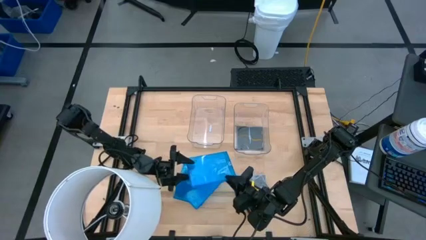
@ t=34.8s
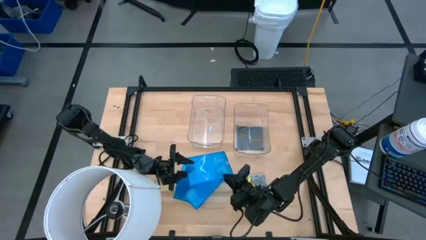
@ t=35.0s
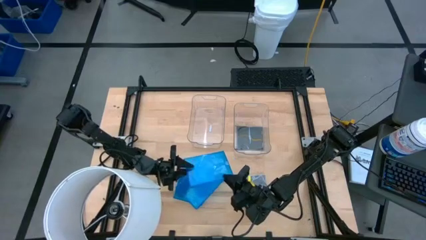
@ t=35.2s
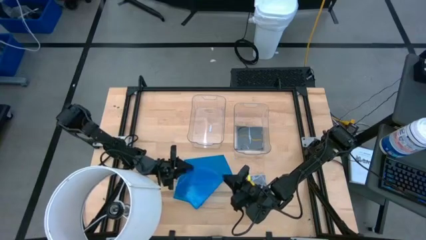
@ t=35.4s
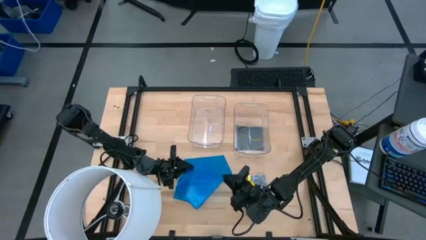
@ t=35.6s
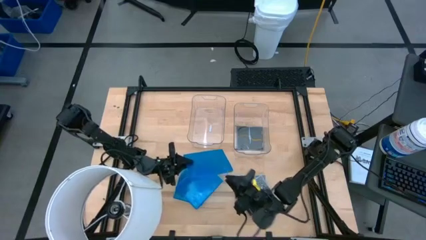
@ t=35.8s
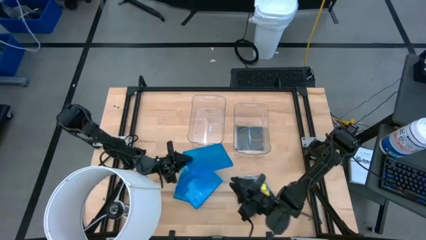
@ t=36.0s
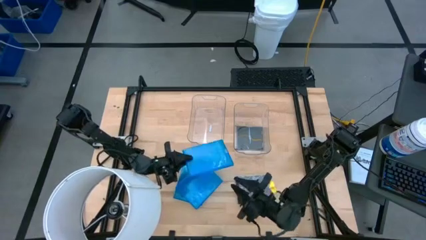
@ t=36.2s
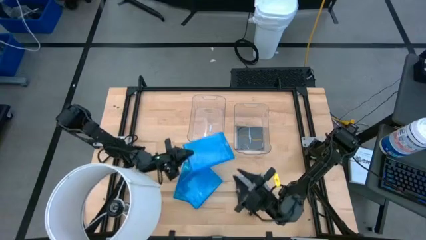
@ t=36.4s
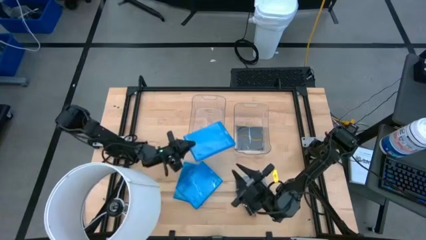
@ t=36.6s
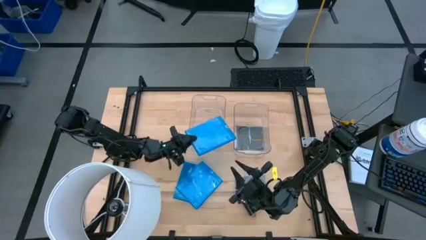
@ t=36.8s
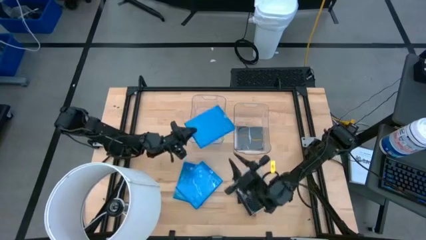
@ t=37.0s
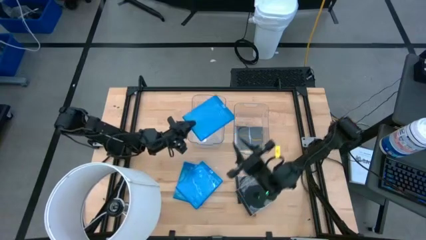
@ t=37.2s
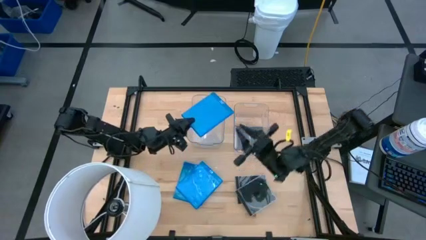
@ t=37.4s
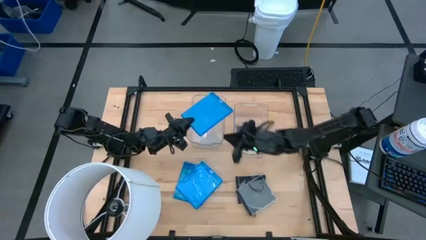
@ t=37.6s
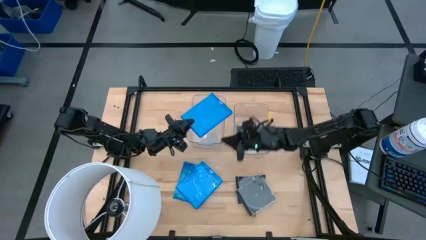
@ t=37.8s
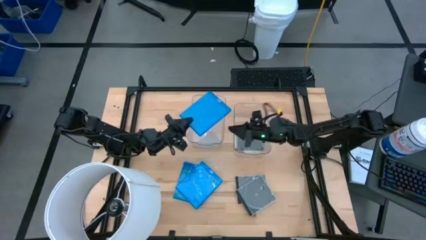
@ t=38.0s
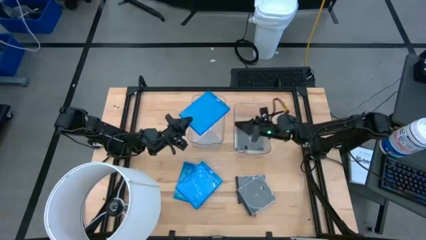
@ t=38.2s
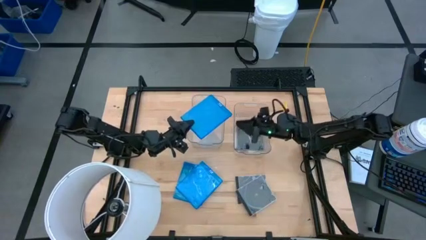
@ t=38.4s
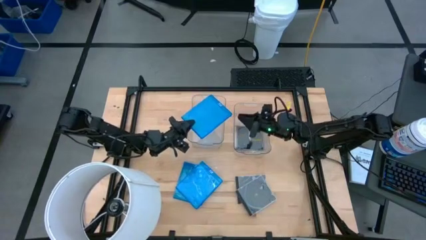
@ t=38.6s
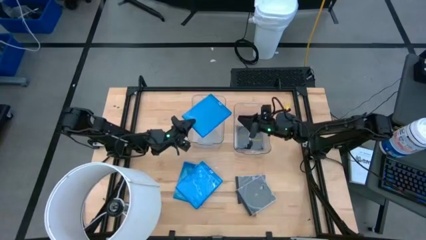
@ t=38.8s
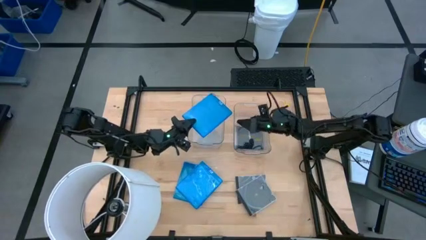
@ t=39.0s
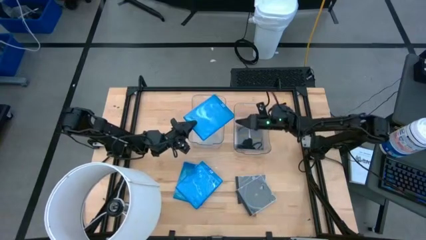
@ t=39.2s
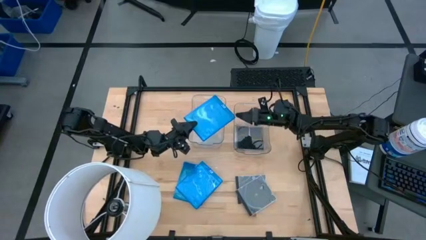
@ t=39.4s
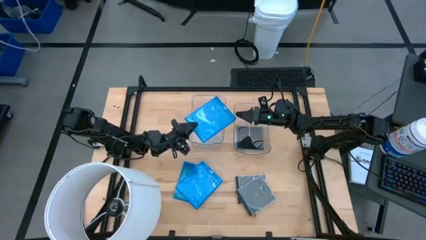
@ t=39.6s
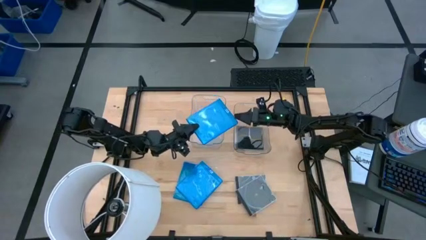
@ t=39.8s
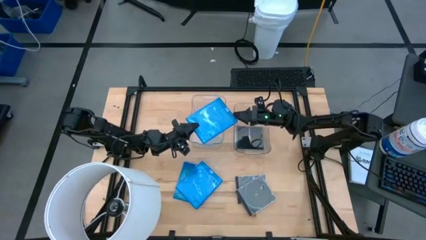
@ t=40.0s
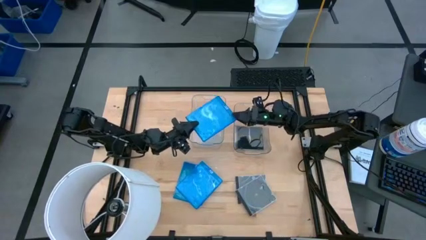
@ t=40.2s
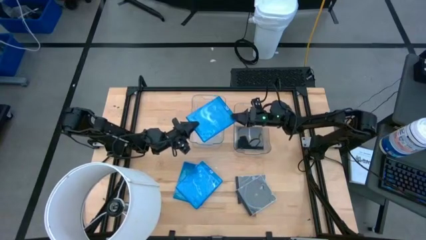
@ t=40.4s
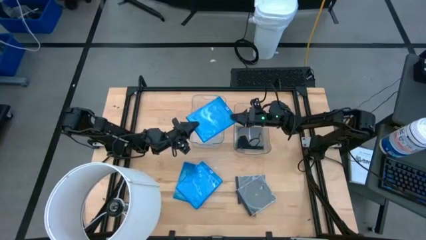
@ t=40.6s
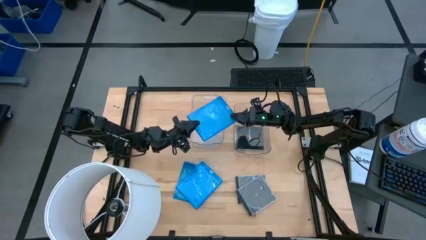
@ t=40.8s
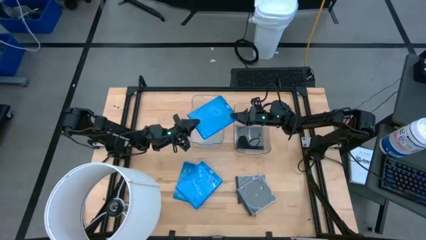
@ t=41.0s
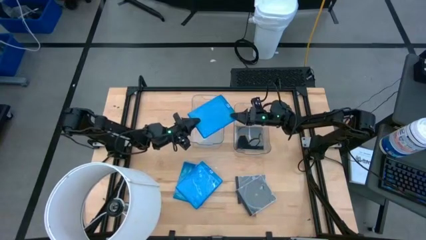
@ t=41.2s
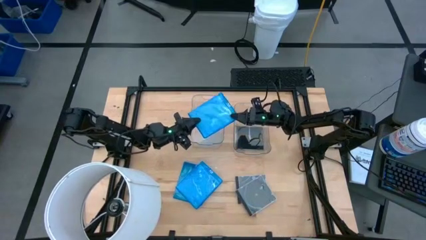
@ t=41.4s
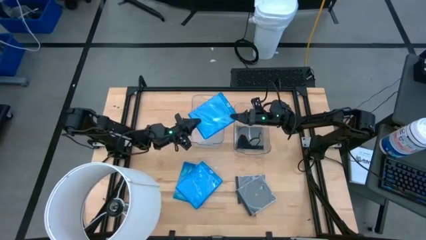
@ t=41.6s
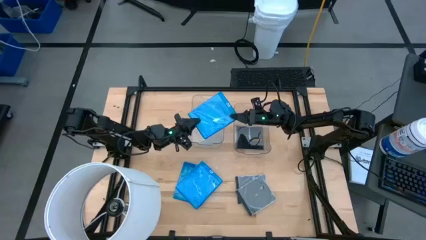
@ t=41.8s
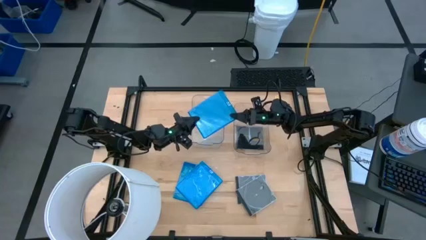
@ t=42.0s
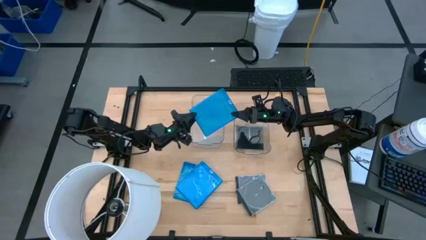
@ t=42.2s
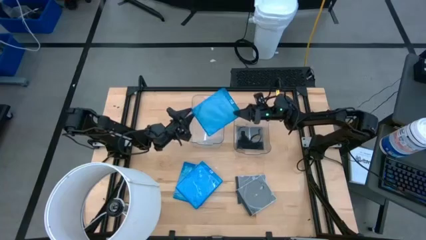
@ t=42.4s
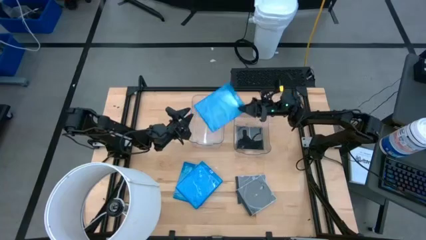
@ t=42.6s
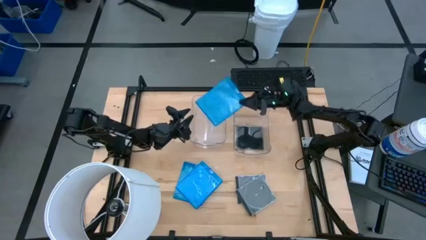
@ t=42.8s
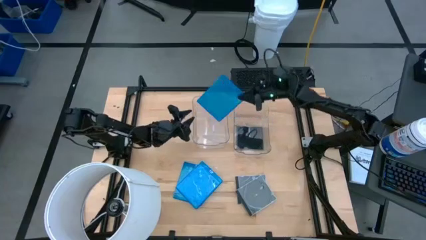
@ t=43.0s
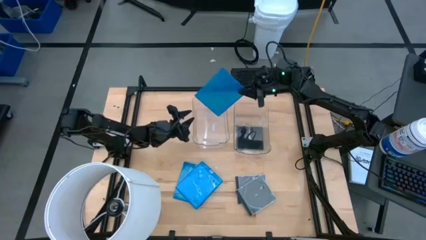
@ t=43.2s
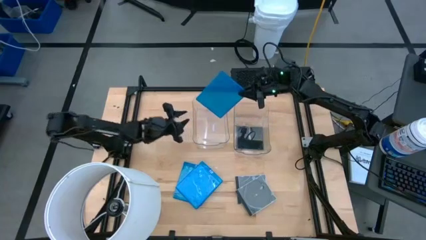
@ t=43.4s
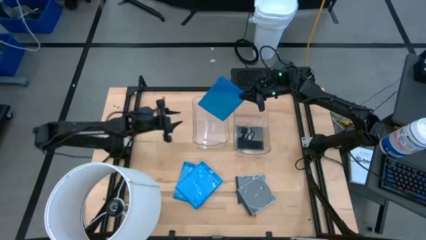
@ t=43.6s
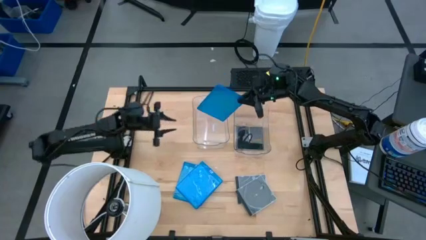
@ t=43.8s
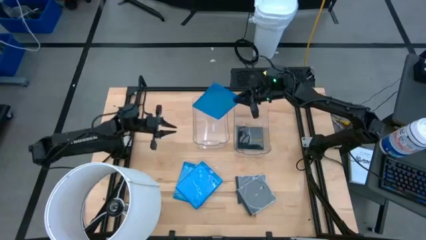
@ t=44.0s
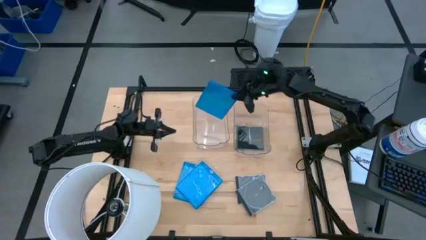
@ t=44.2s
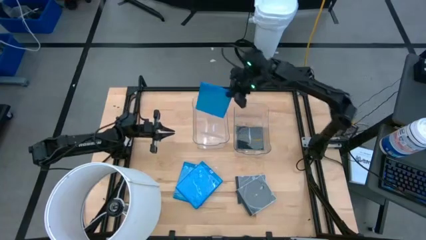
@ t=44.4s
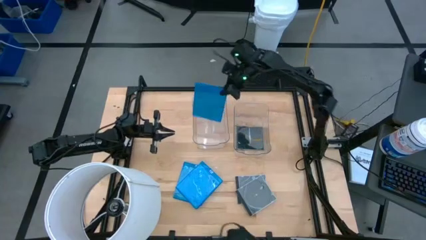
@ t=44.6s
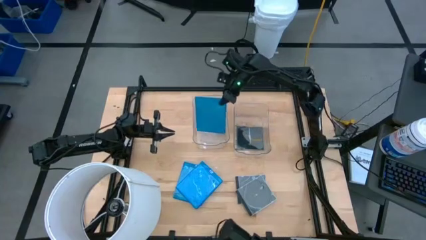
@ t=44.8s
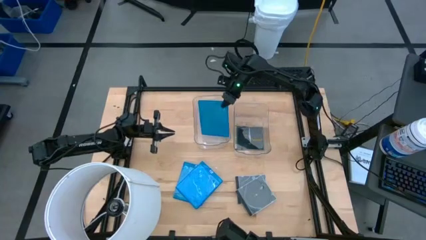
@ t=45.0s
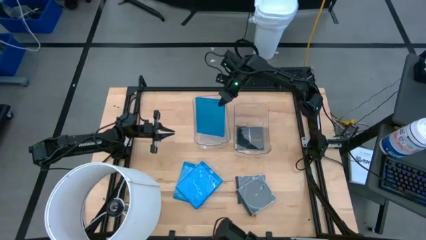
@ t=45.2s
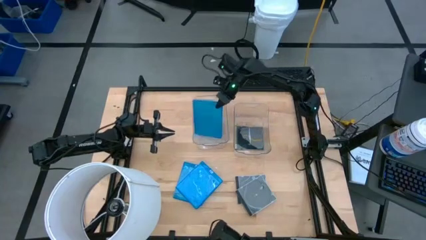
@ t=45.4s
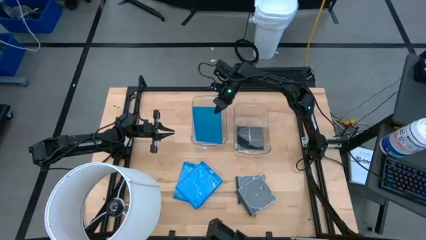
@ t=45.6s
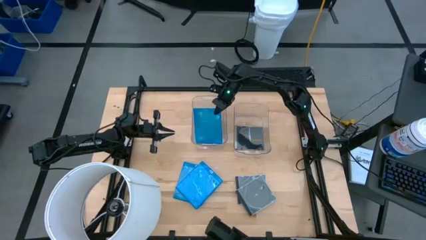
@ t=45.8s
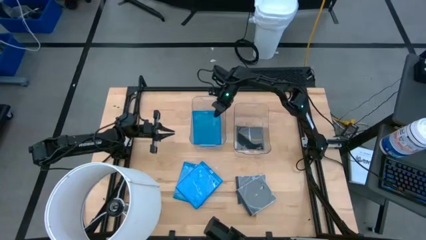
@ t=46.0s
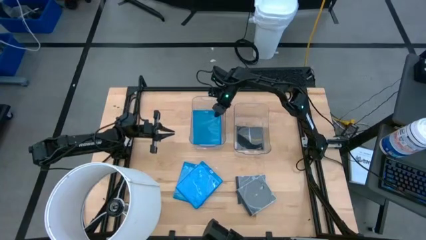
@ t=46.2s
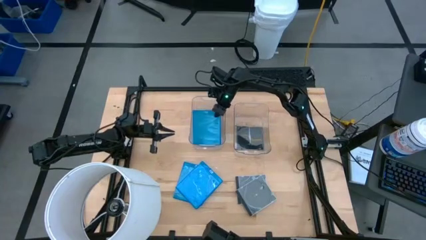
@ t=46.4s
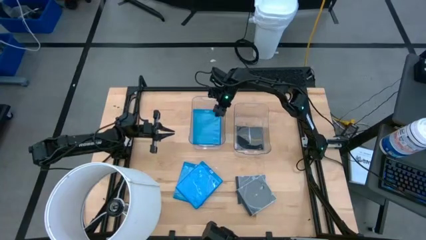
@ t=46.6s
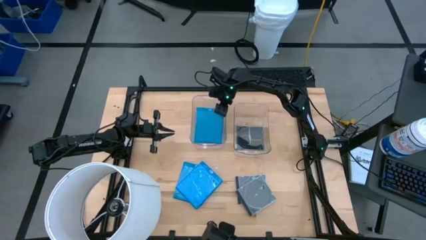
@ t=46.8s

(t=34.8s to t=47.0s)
Task: Pick & place jewel cases by type
Put the blue CD case into the left transparent bin
